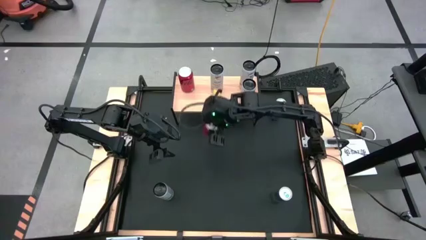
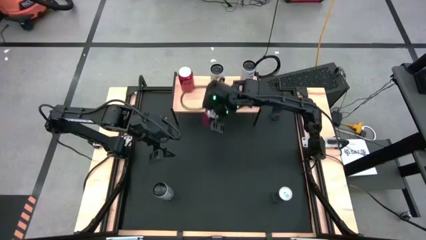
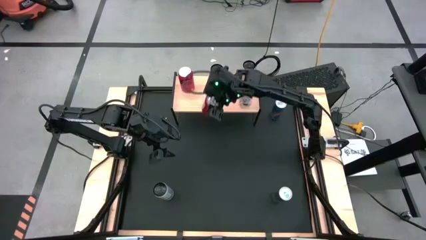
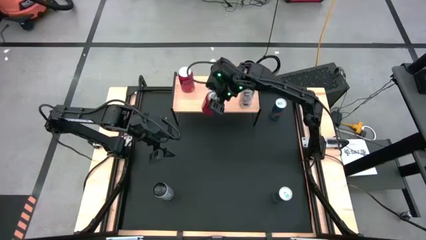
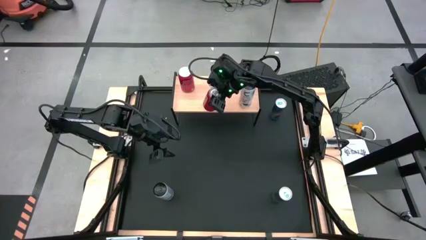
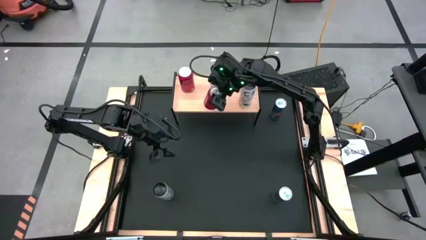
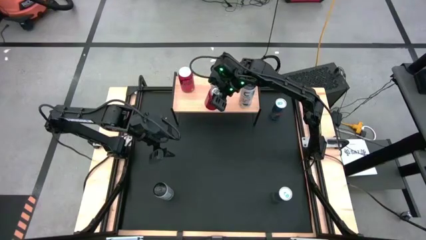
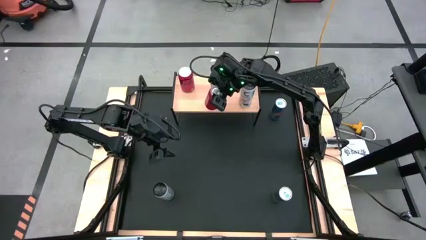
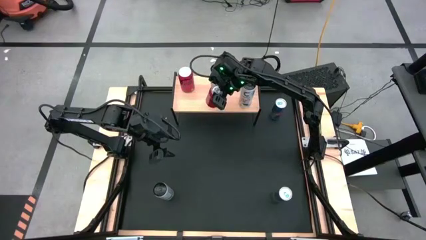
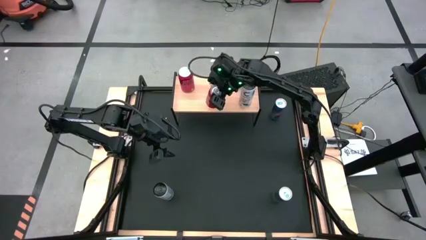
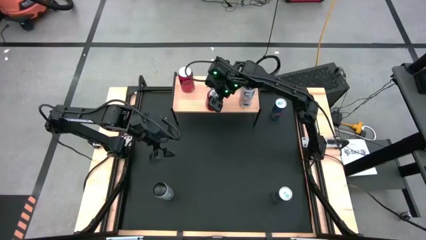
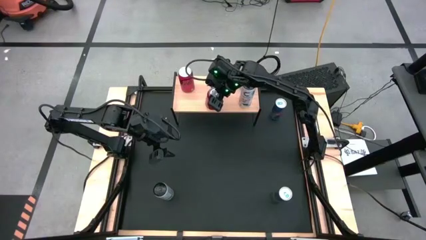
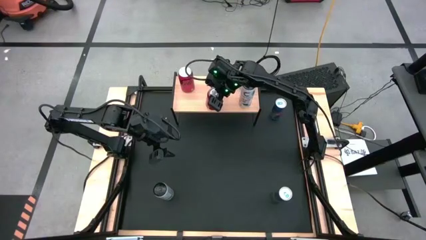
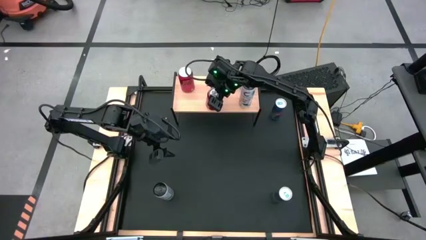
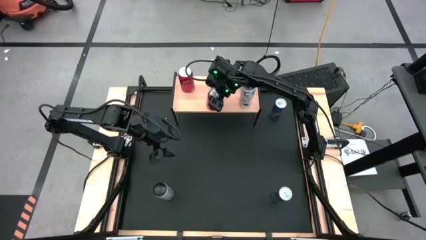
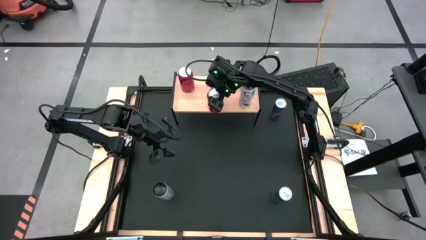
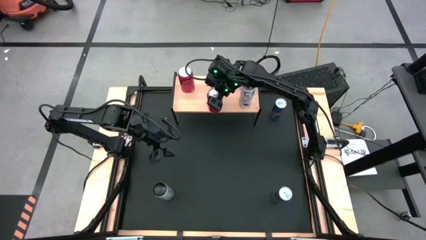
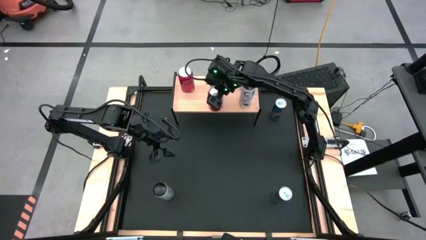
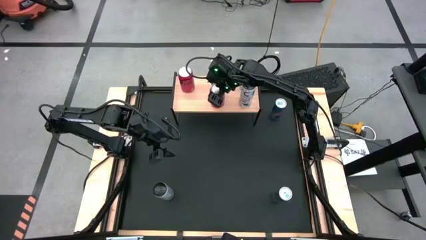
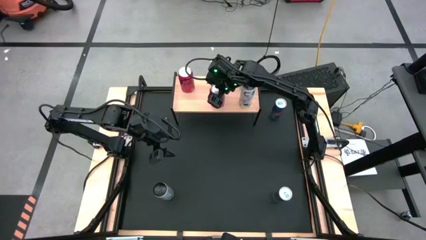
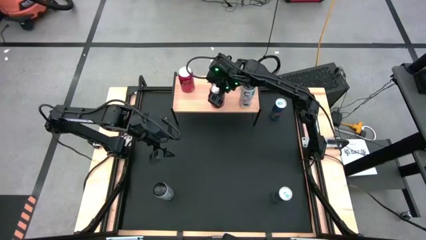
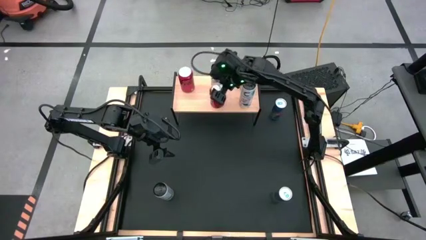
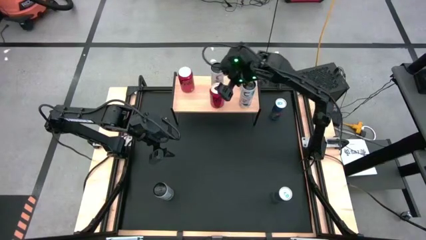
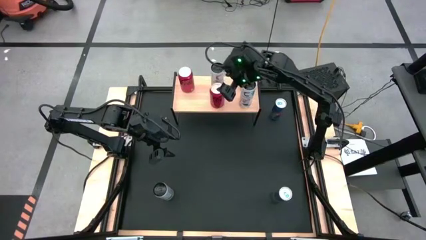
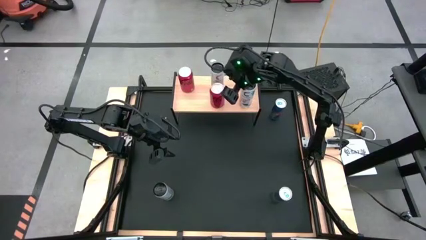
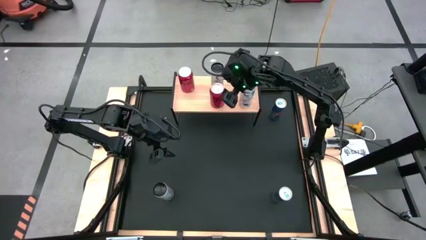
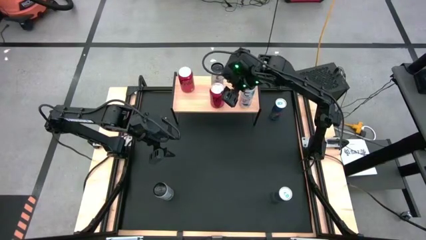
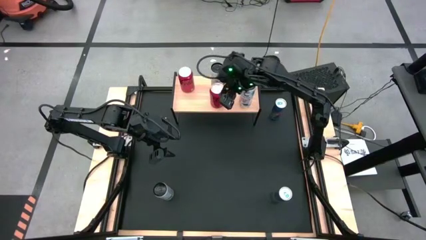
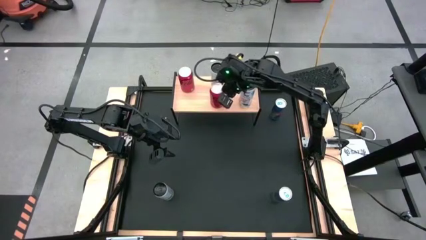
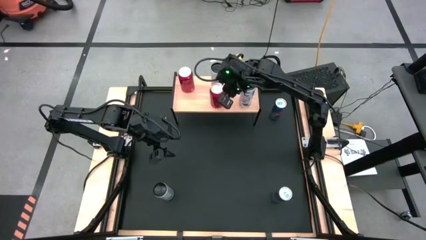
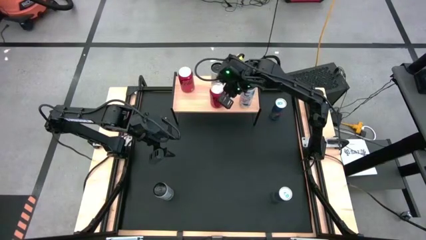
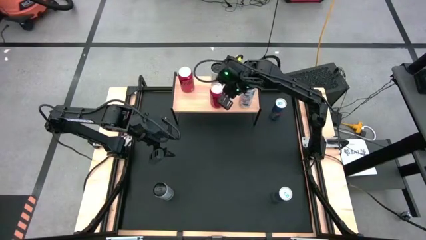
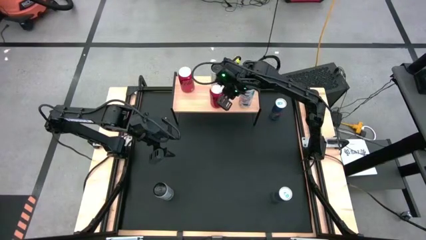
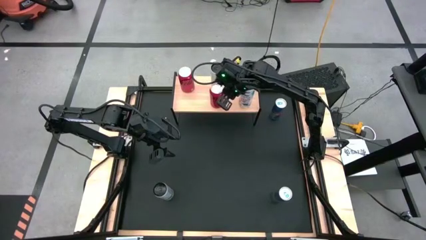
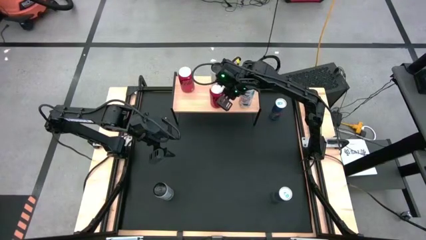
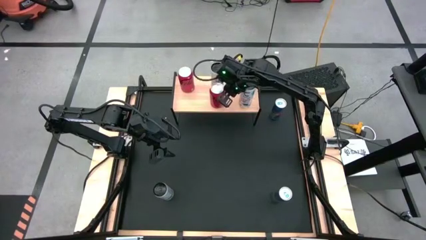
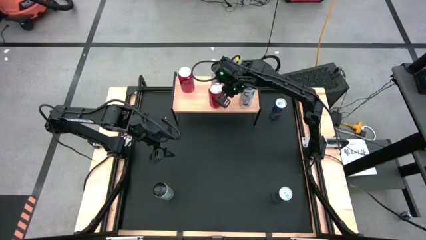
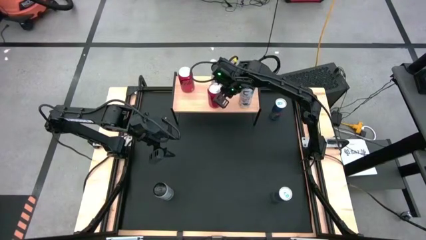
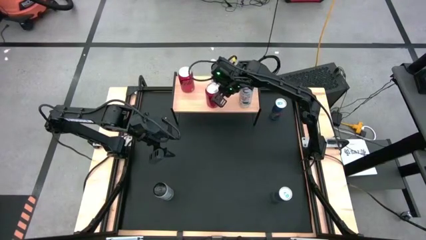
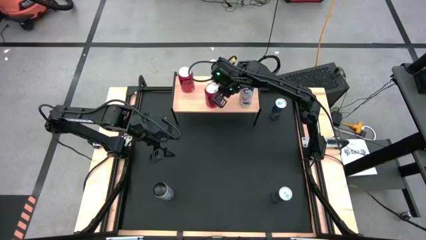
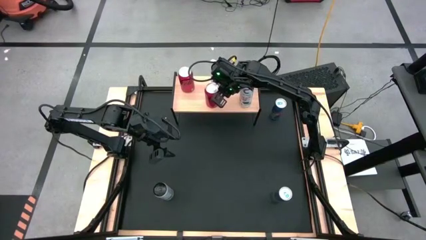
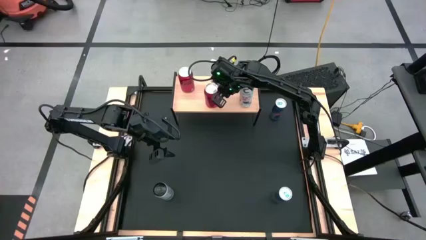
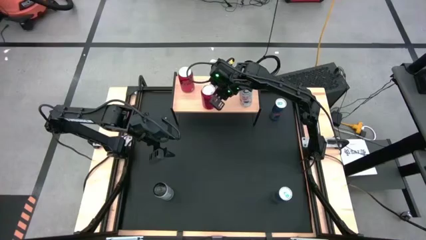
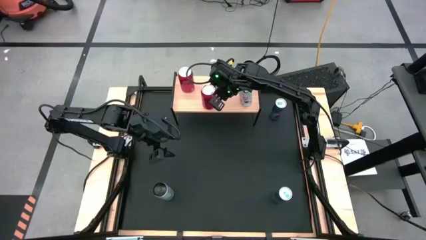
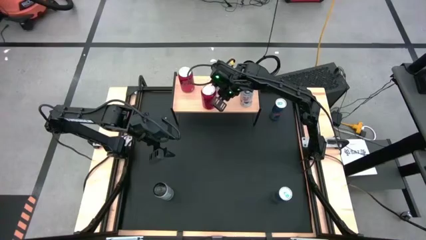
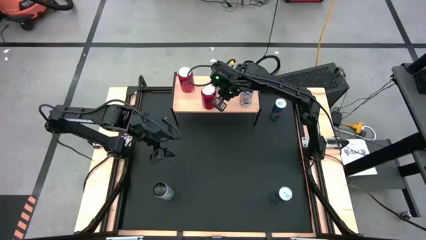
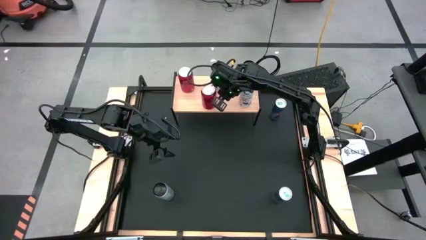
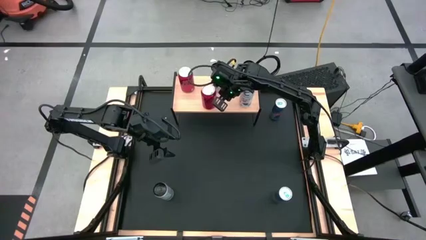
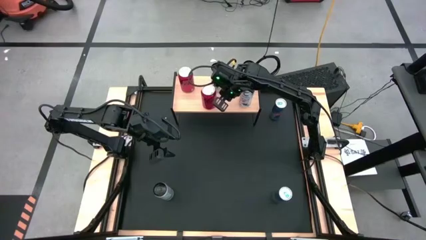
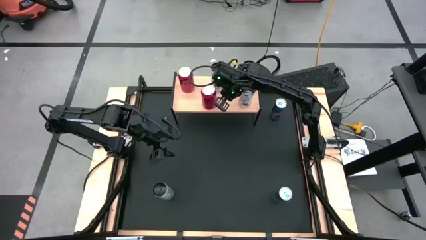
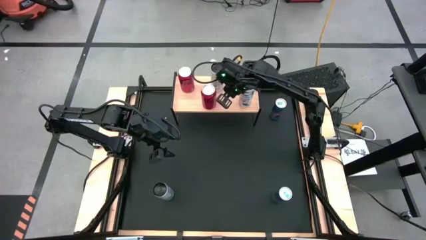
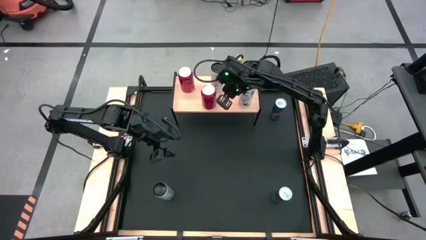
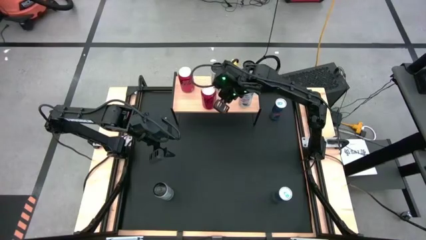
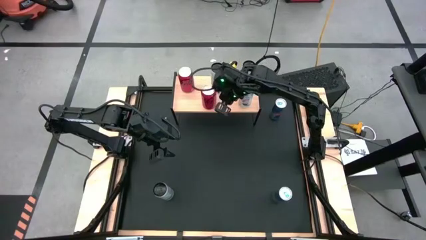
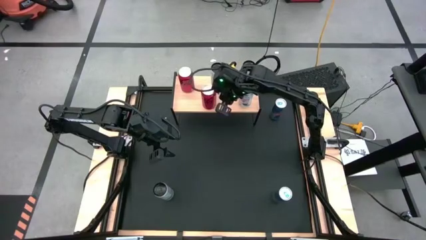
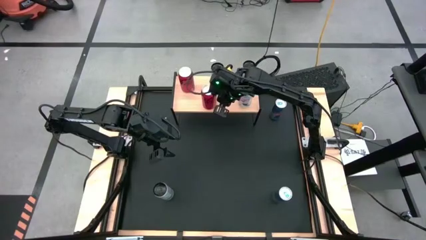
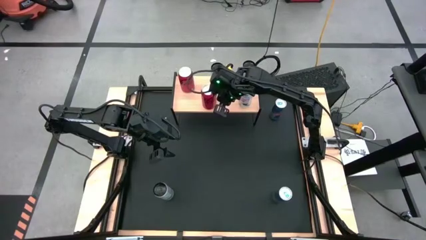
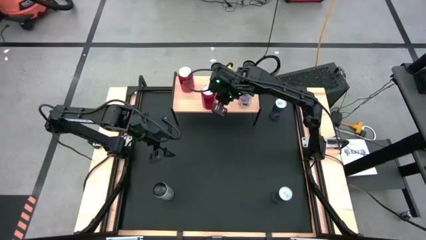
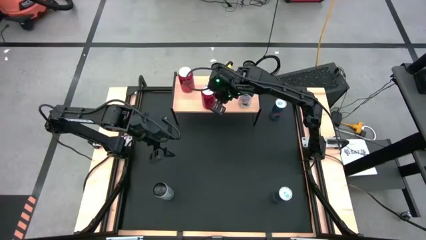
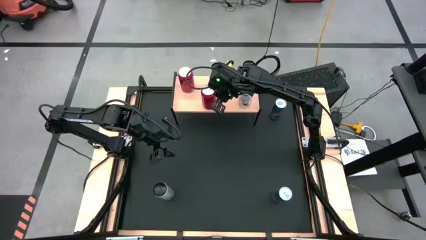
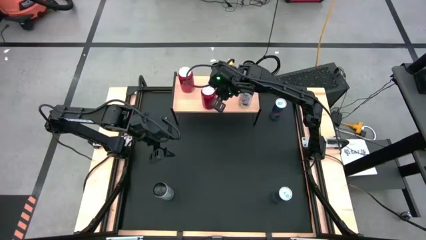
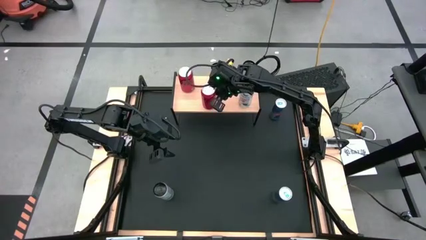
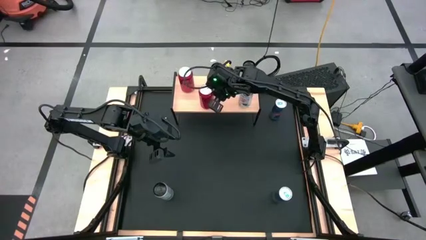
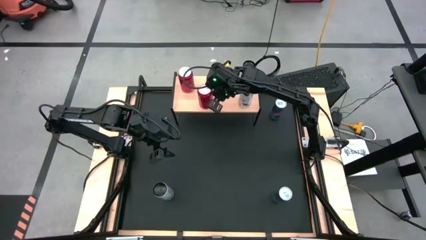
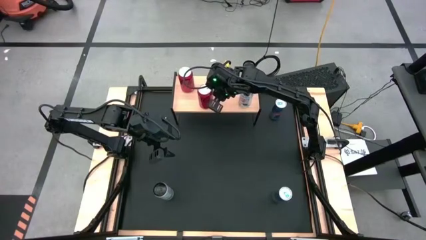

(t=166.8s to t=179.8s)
Task: Place canned beverage on shelf
Put the red soda can on the shelf aligned with the other red soda can

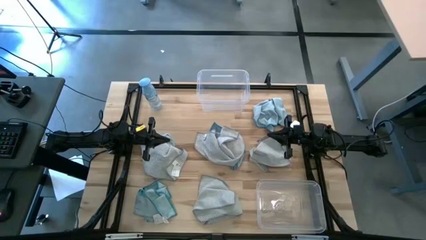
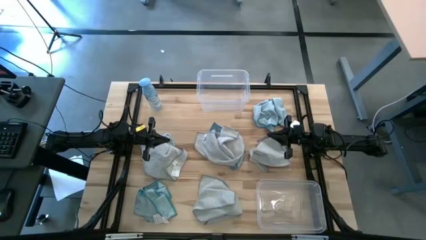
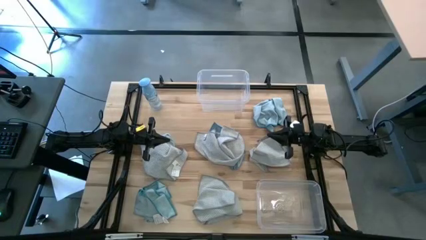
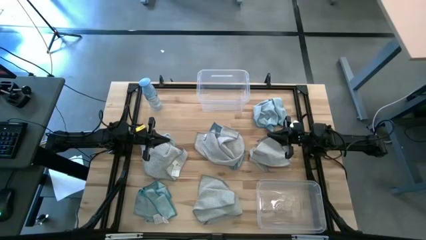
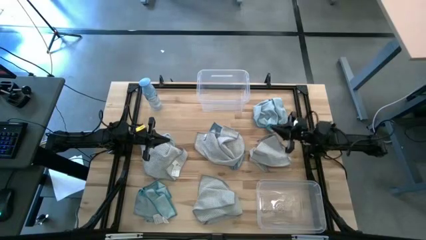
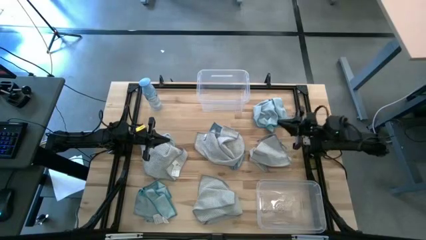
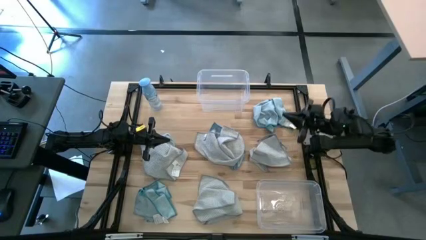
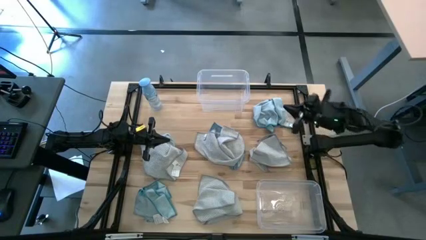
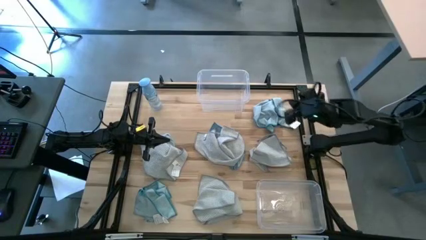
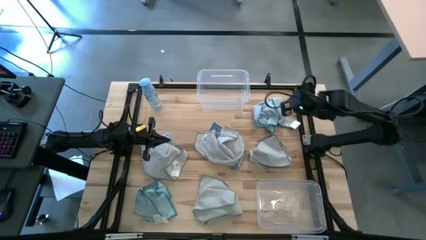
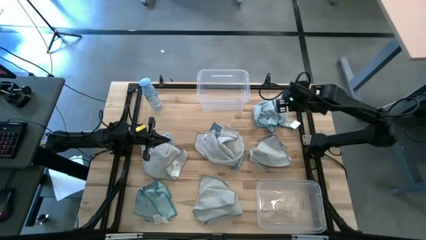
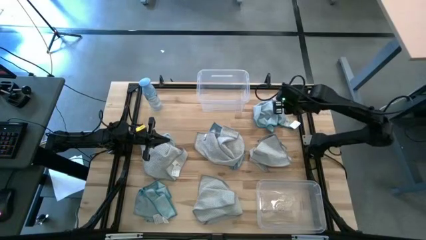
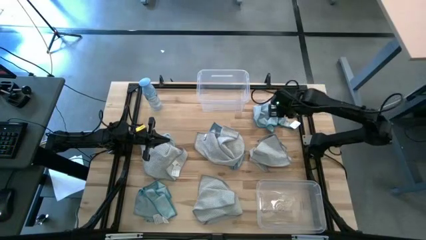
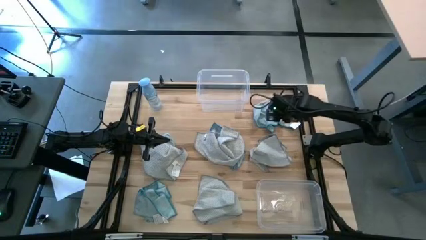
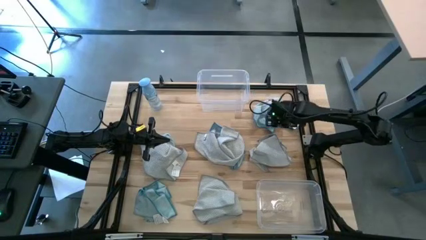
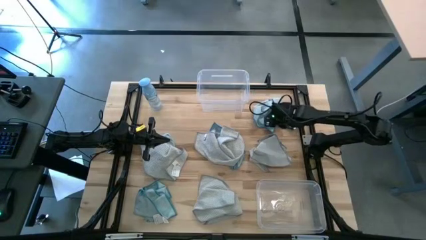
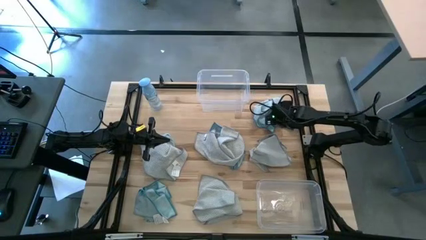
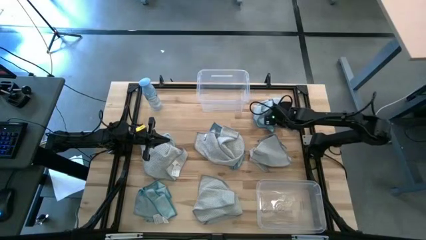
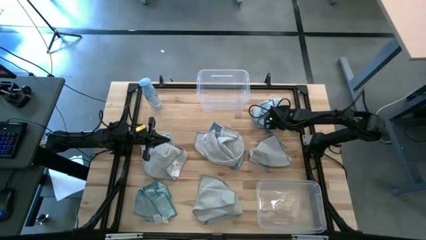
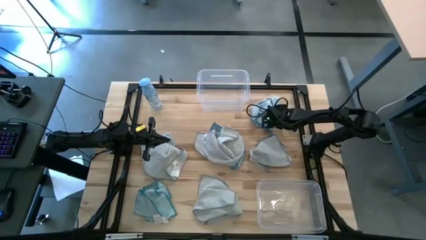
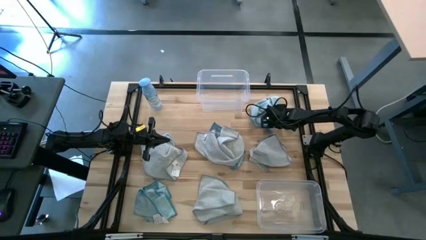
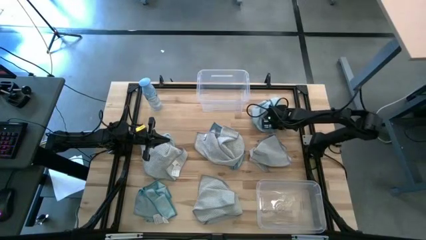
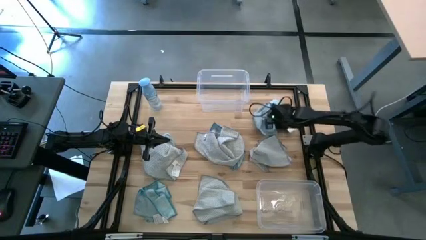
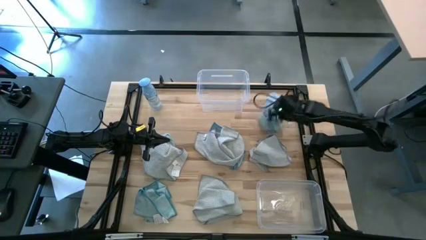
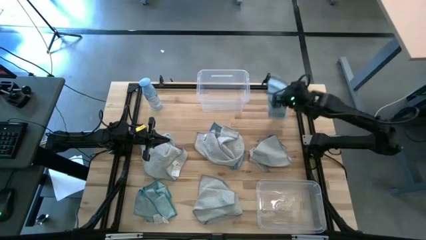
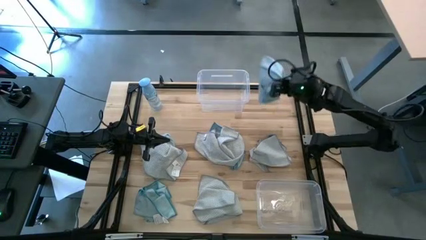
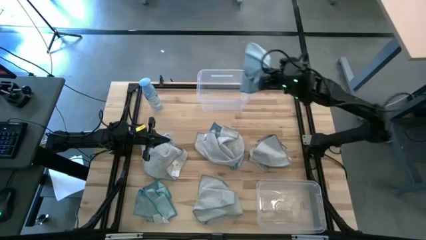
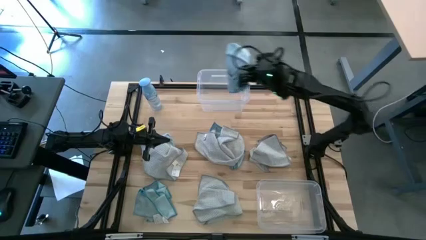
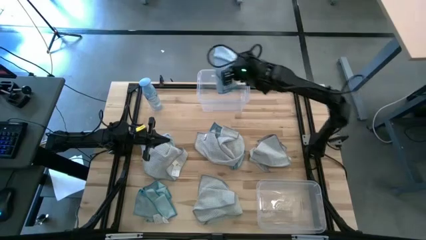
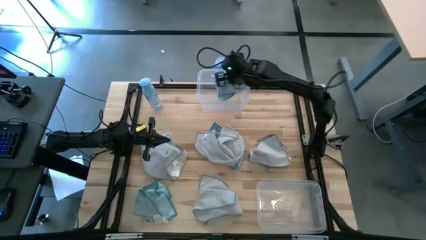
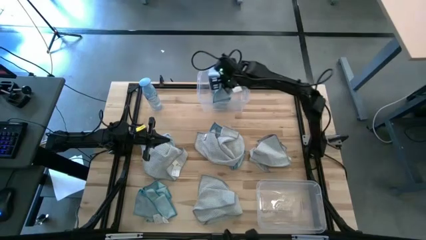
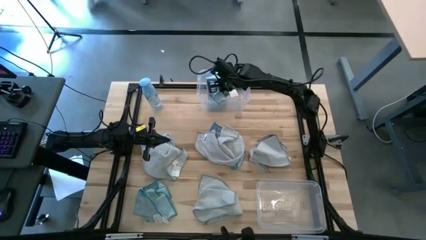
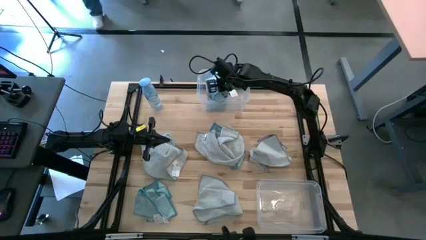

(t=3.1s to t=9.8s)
Task: Sort microfiber towel by color & place in baskets
Put the blue towel into the top transparent bin
